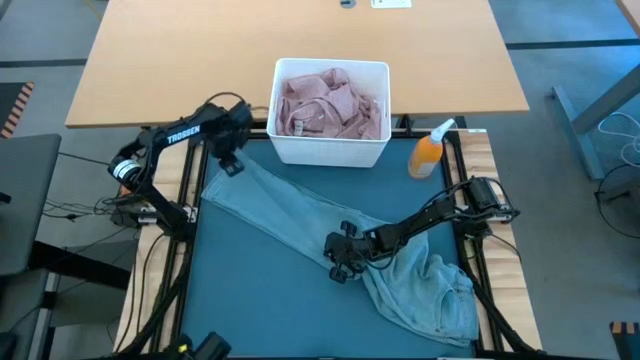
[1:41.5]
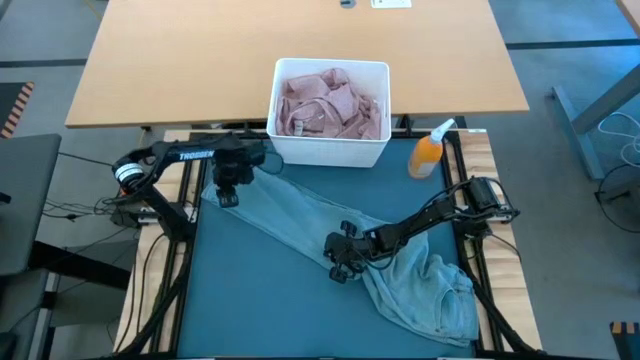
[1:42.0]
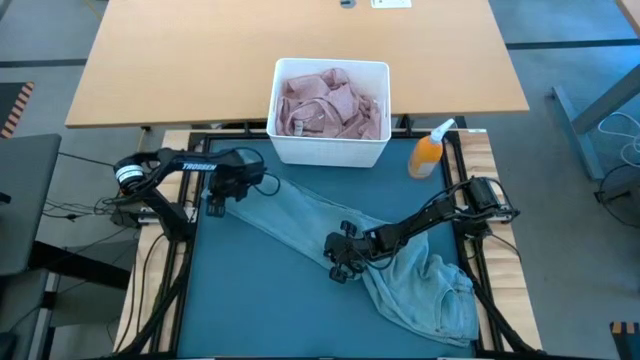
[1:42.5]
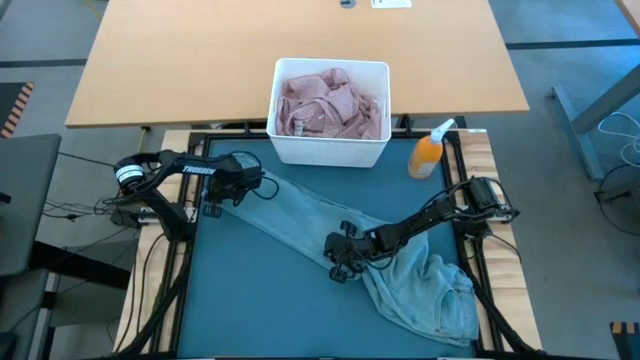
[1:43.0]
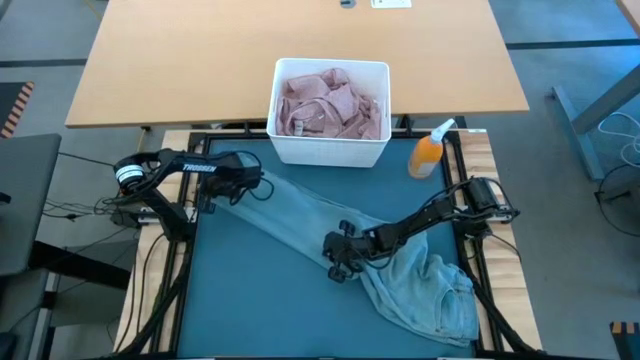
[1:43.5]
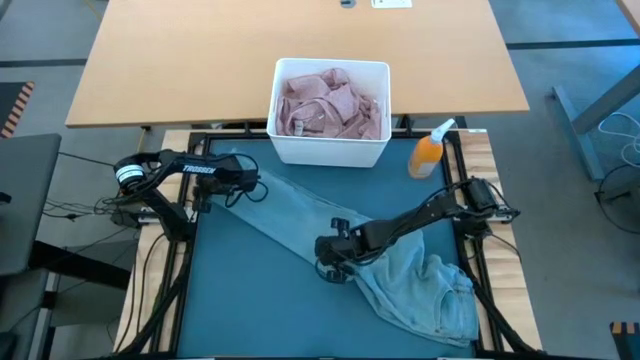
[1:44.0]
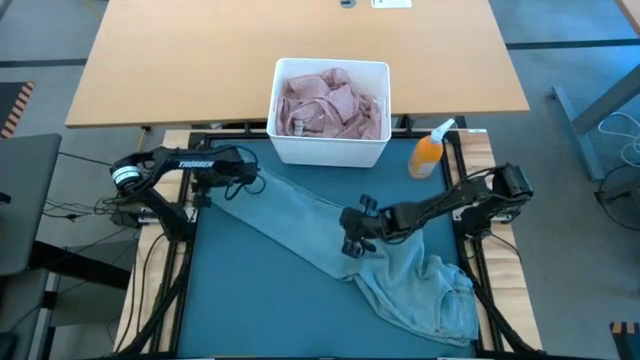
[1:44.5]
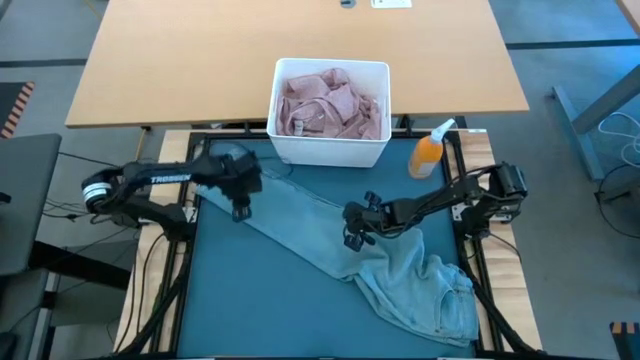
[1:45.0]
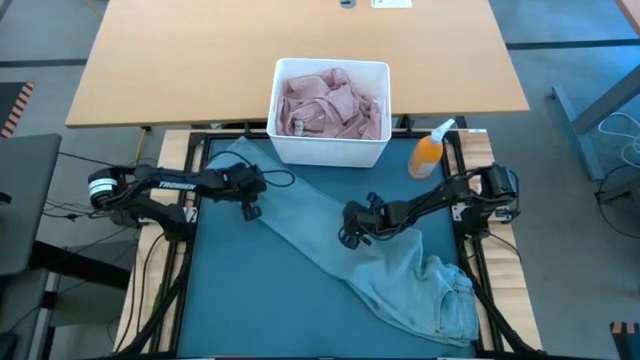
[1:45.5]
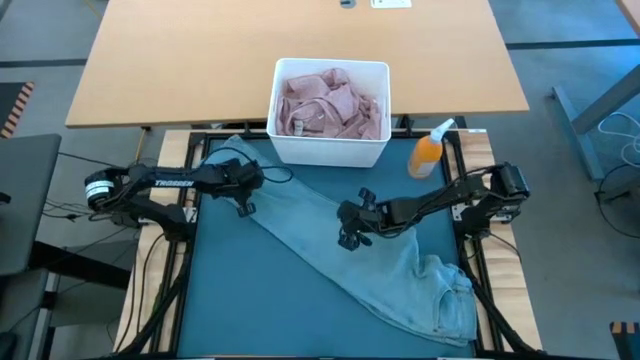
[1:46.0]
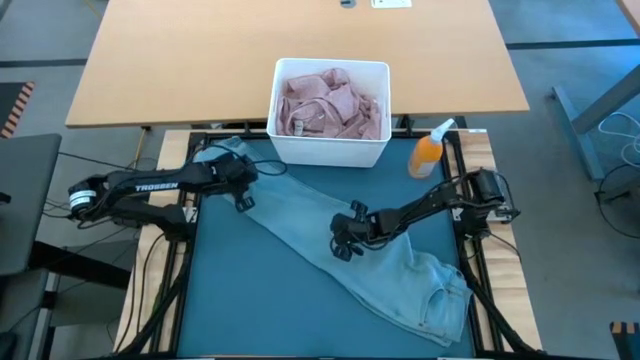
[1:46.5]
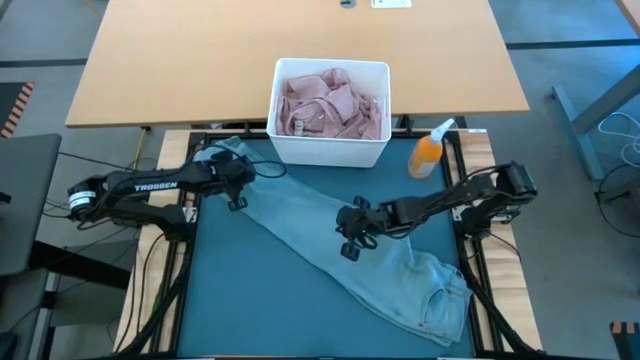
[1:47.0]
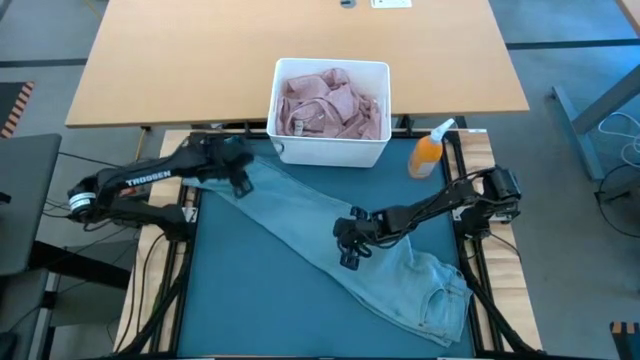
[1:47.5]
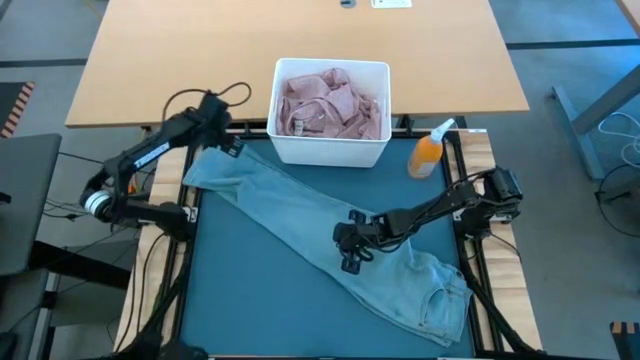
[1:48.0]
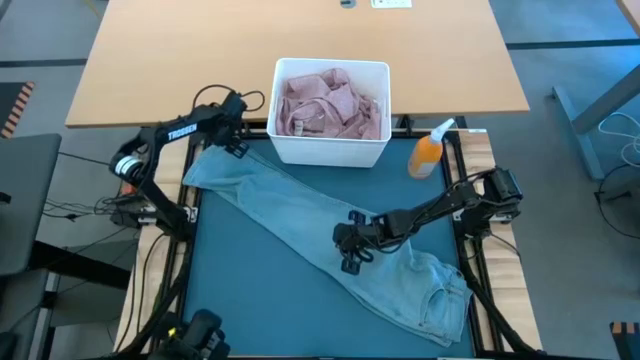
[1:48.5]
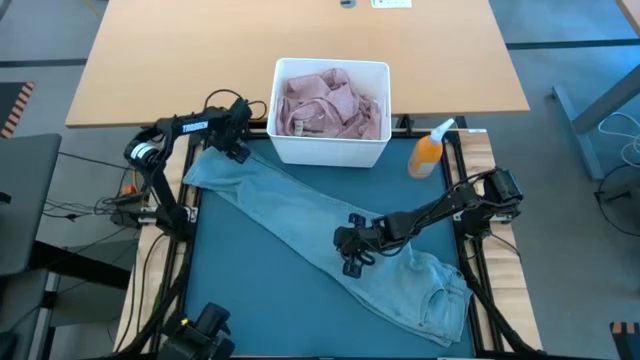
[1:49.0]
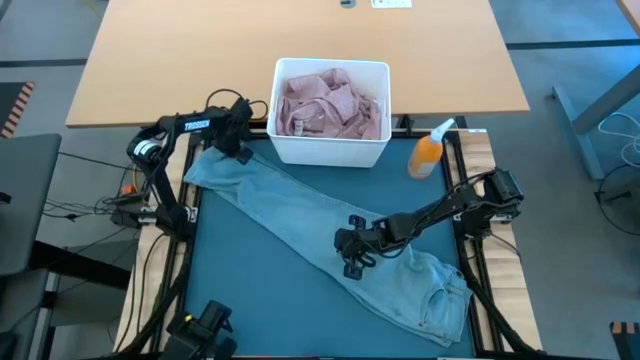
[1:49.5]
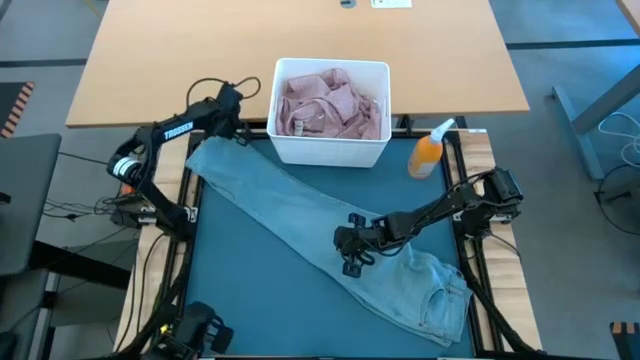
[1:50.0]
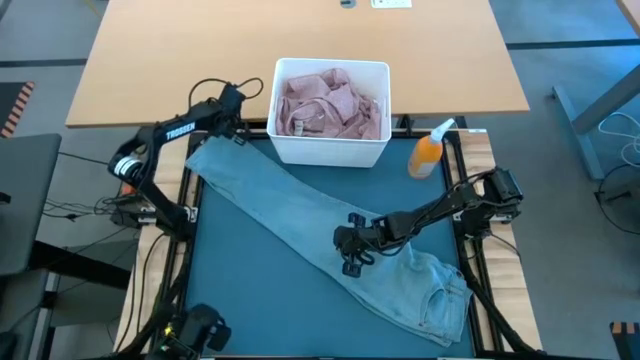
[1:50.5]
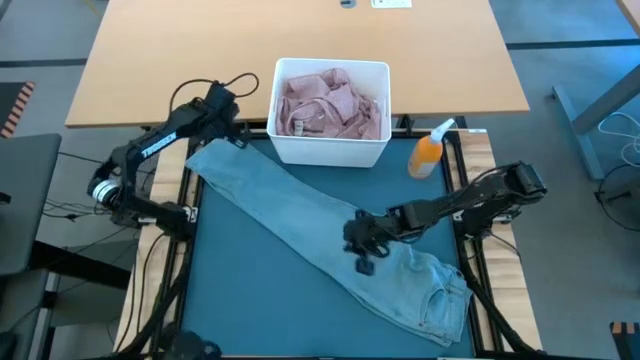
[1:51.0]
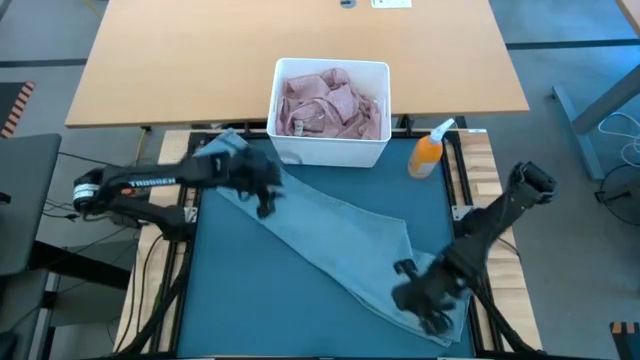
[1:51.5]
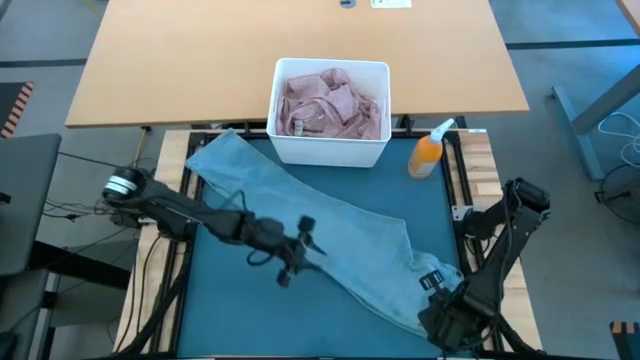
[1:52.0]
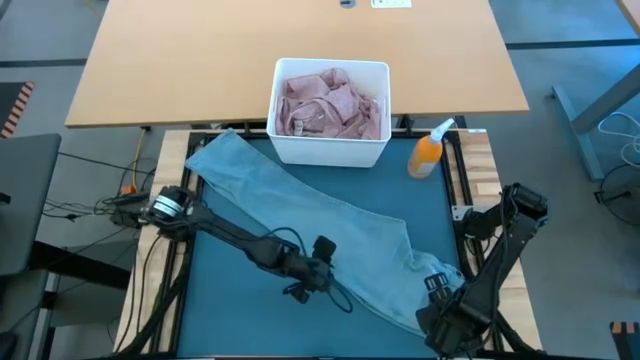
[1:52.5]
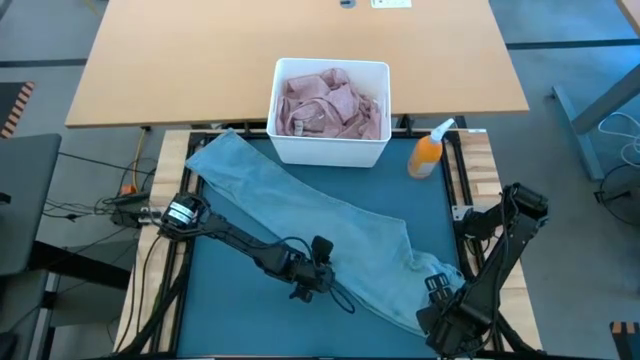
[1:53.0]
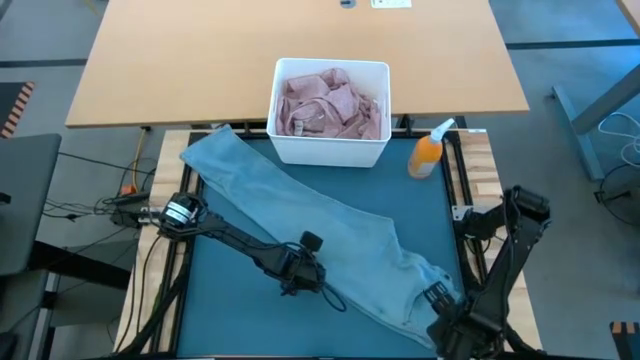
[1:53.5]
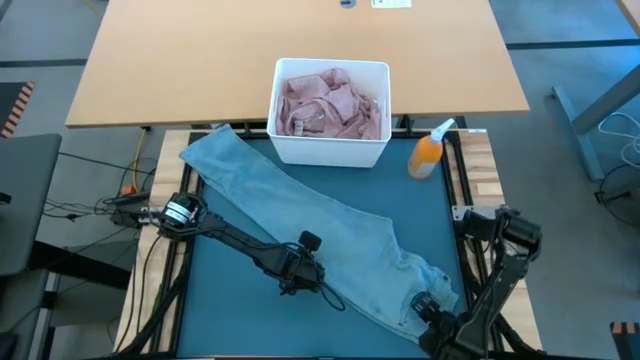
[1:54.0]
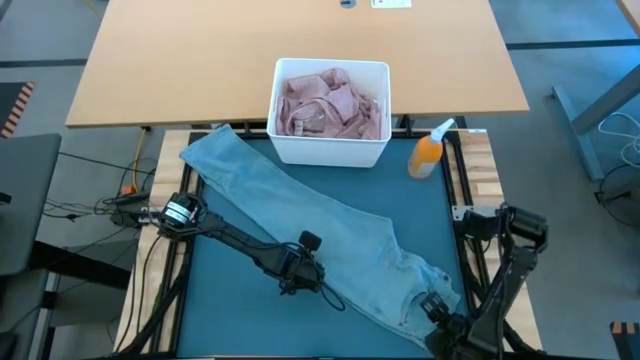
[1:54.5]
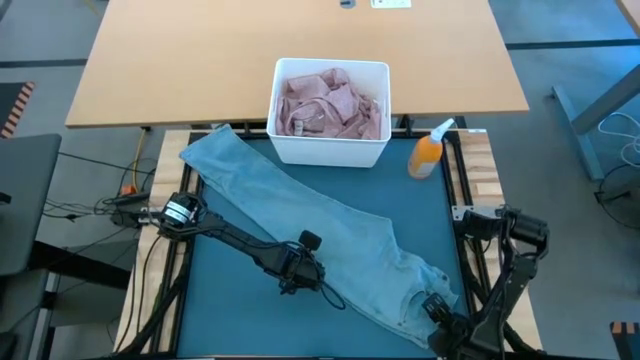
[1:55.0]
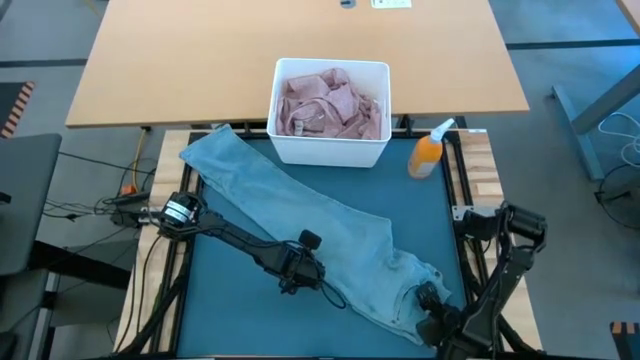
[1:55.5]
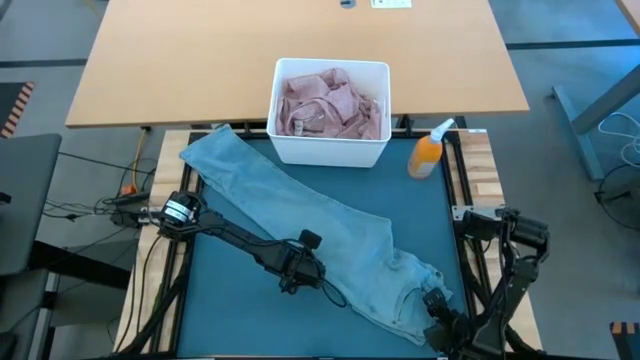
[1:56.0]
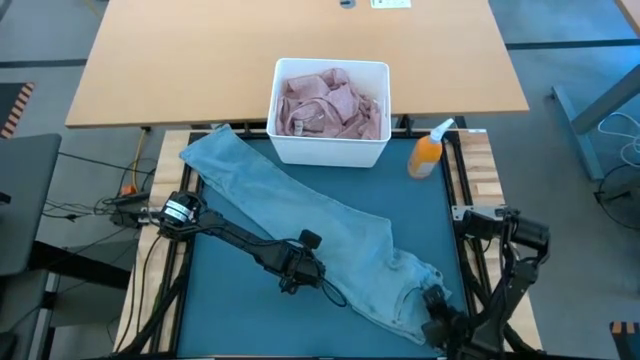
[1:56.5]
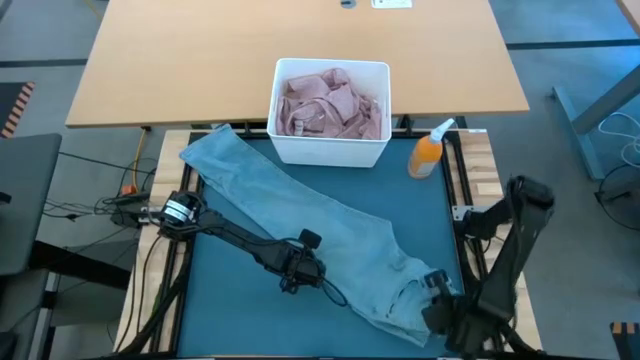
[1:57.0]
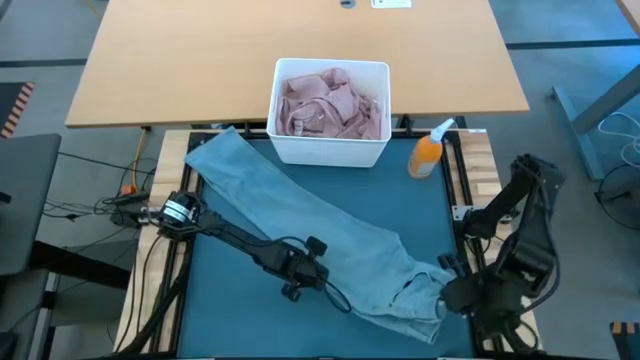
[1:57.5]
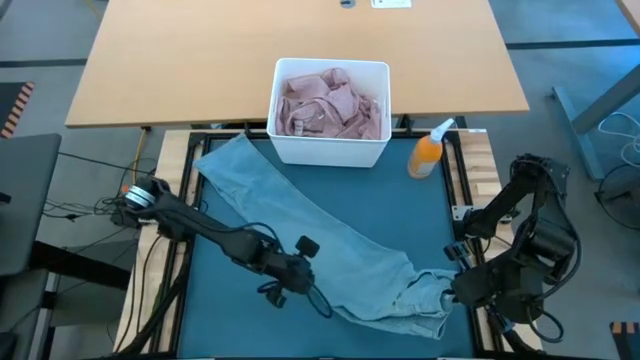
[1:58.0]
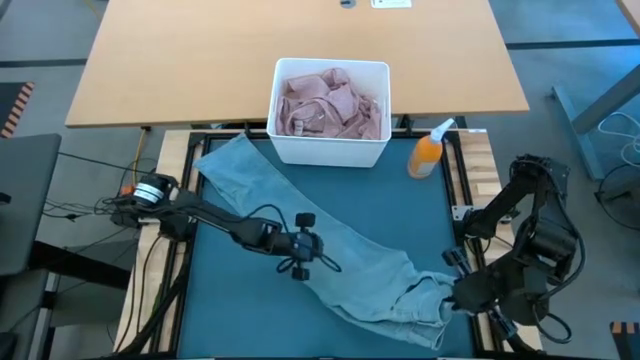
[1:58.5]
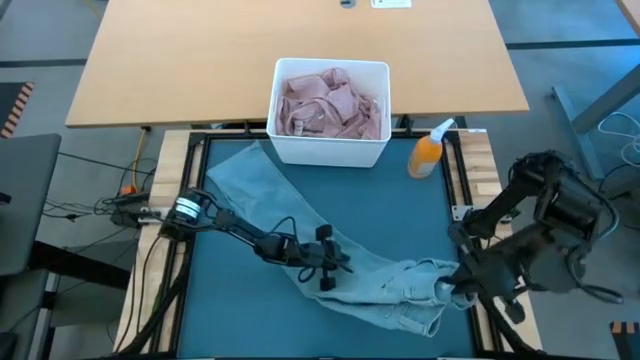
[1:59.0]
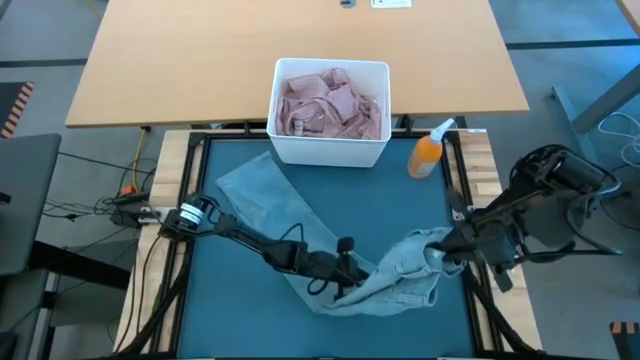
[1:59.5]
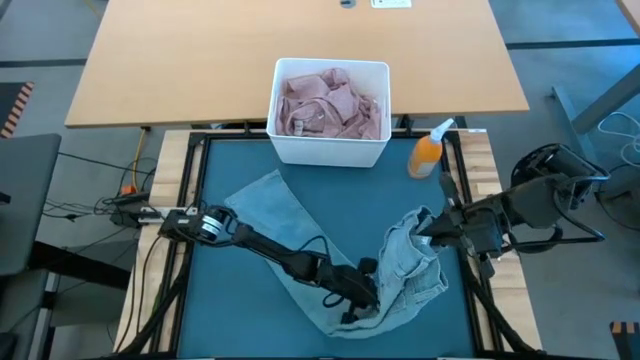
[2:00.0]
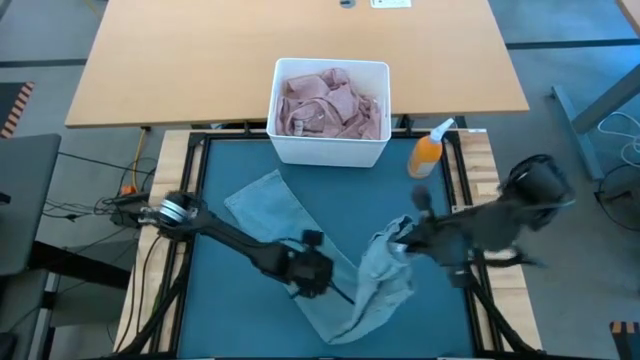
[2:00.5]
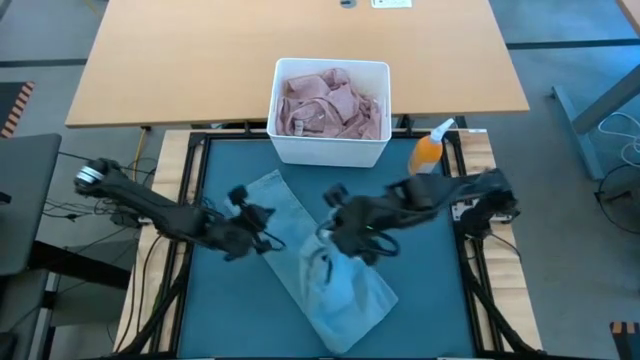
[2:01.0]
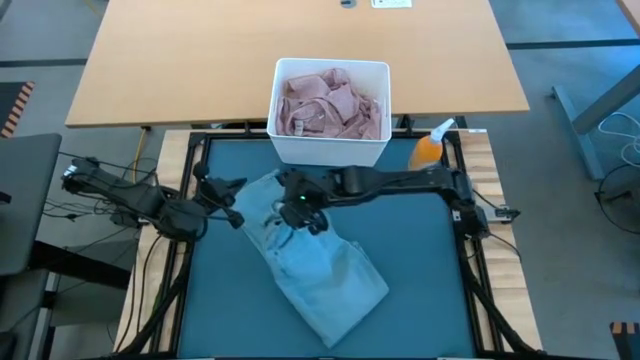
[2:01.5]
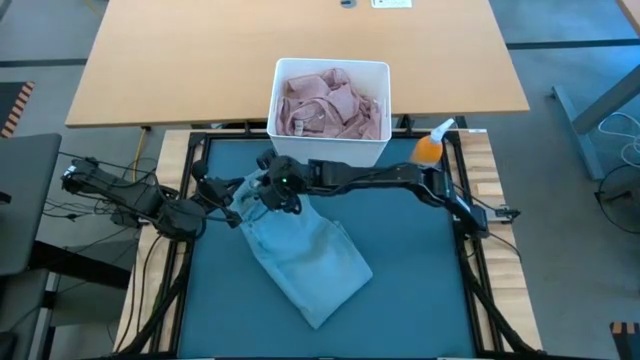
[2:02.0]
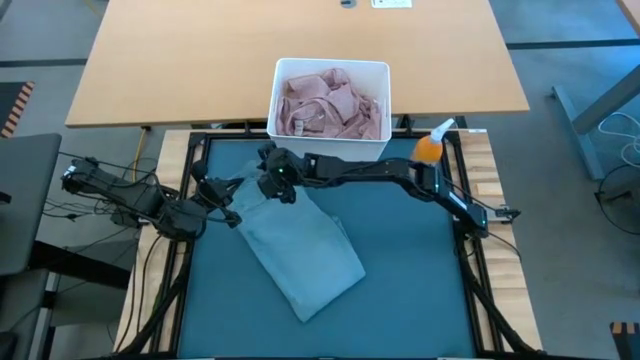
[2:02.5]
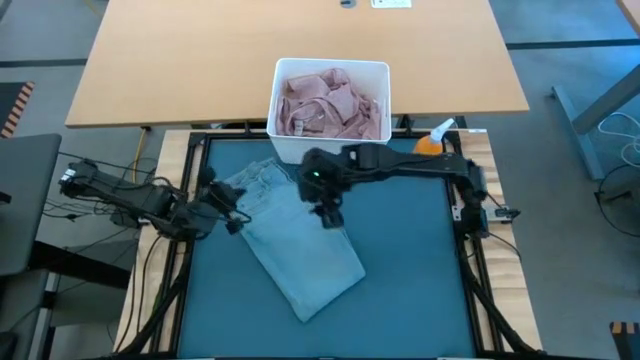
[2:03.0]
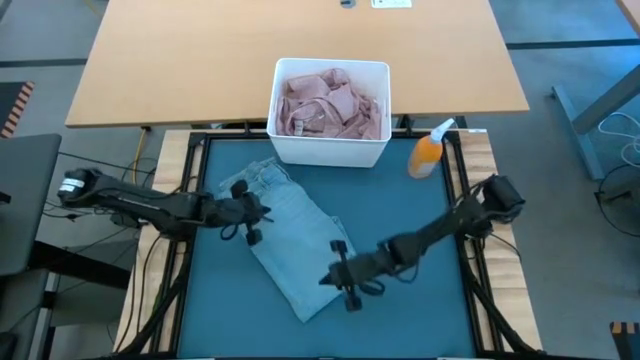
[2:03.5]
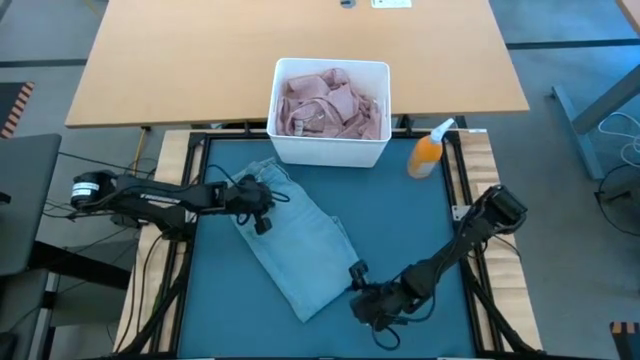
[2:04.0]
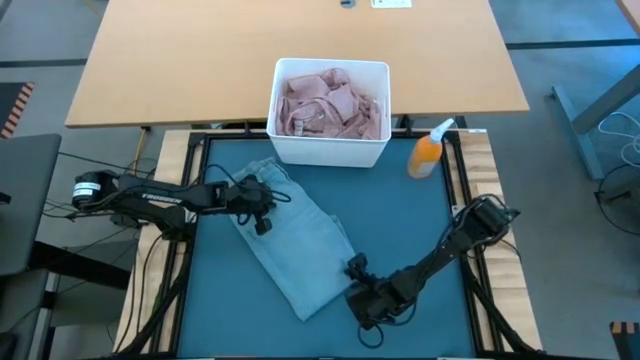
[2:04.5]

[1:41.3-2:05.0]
Task: Fold Laundry from Bin
Fold the blue pants
